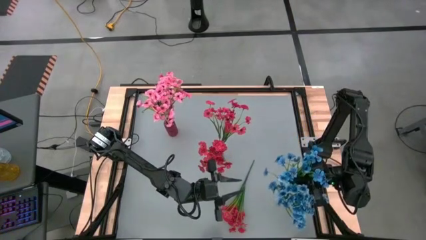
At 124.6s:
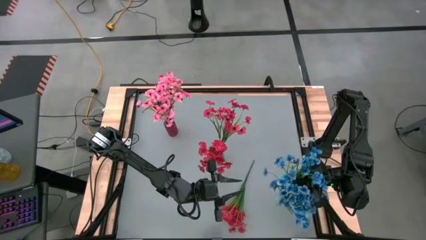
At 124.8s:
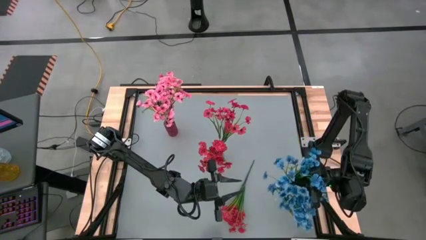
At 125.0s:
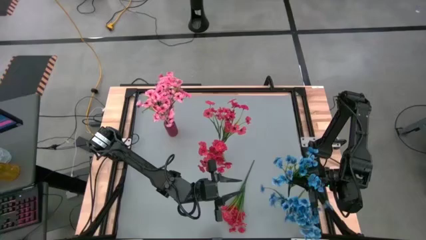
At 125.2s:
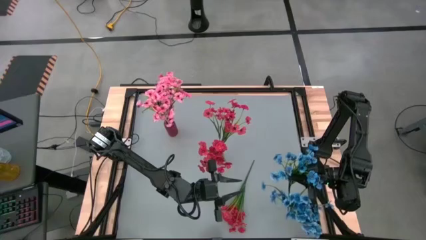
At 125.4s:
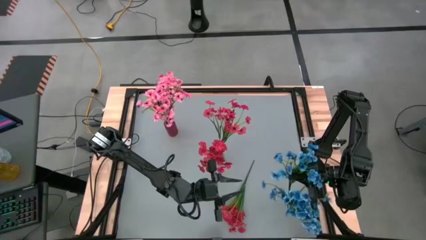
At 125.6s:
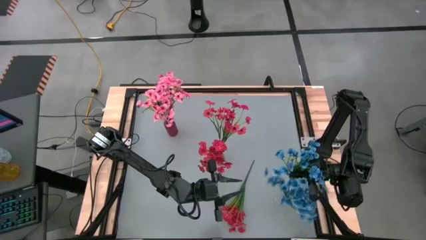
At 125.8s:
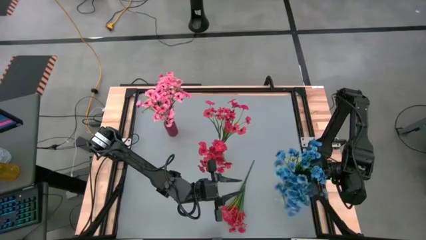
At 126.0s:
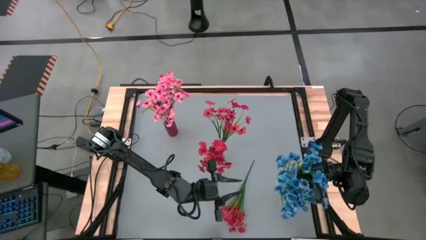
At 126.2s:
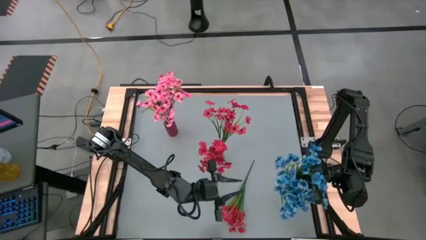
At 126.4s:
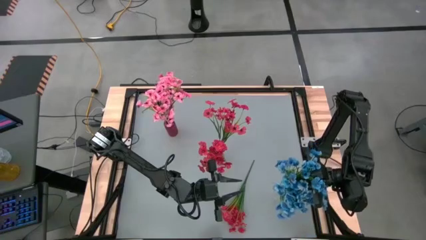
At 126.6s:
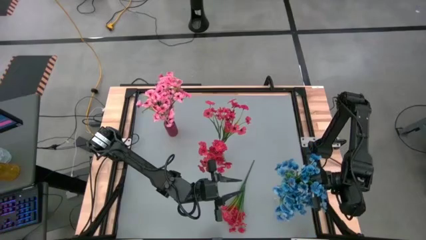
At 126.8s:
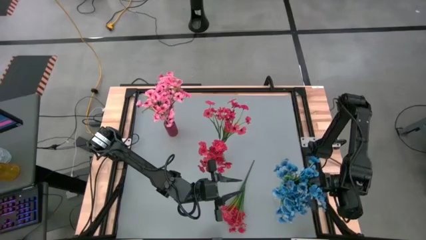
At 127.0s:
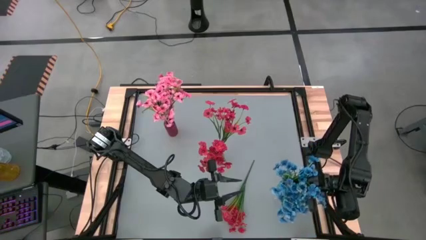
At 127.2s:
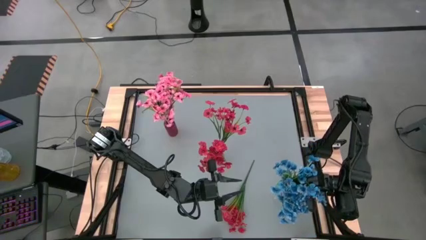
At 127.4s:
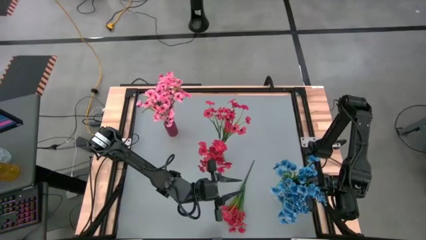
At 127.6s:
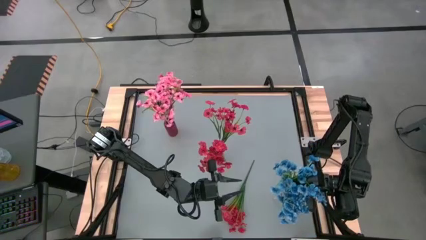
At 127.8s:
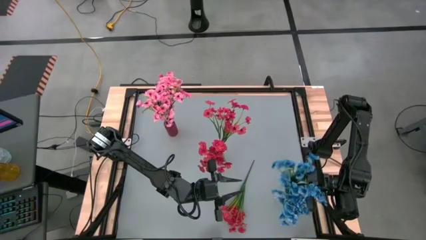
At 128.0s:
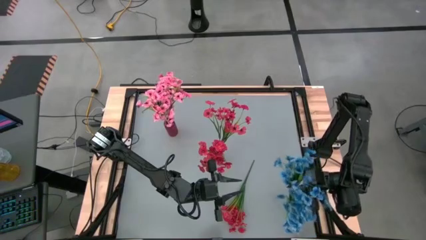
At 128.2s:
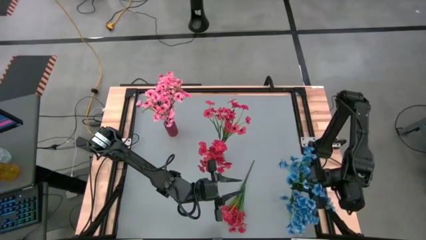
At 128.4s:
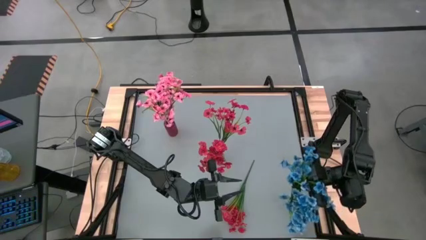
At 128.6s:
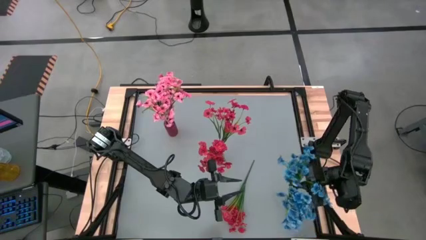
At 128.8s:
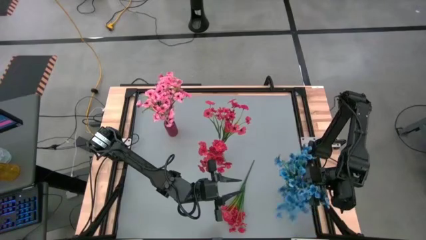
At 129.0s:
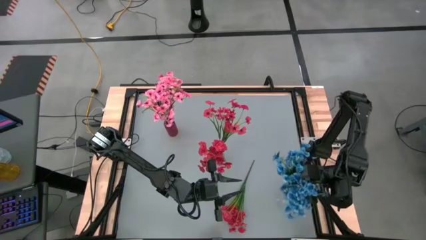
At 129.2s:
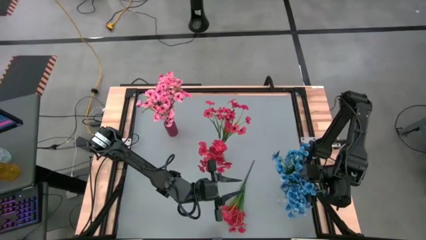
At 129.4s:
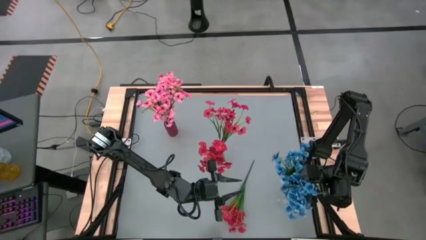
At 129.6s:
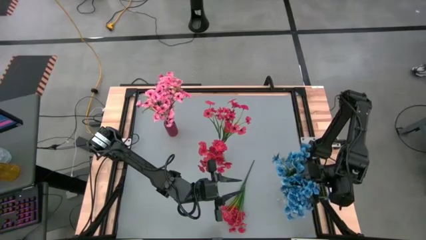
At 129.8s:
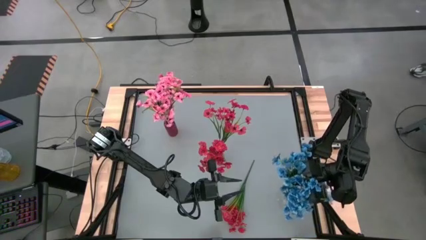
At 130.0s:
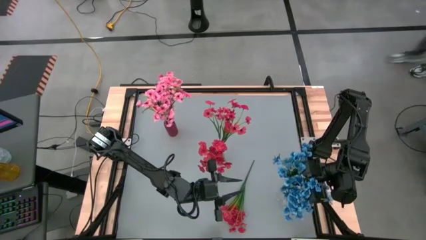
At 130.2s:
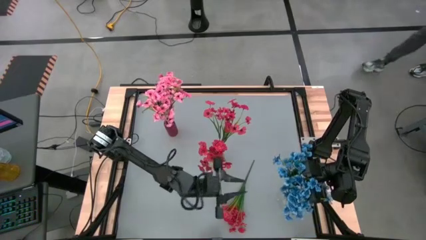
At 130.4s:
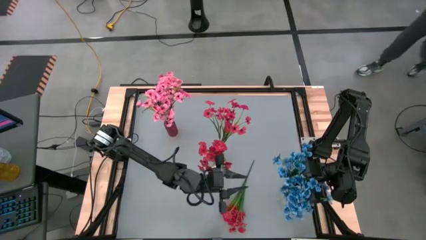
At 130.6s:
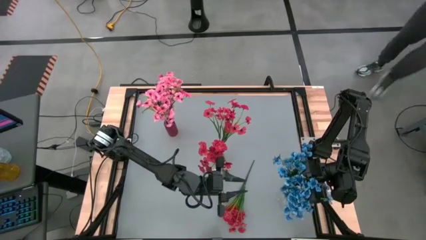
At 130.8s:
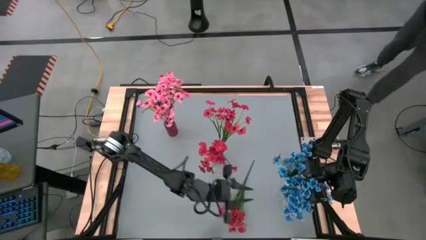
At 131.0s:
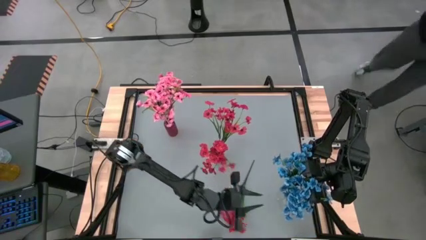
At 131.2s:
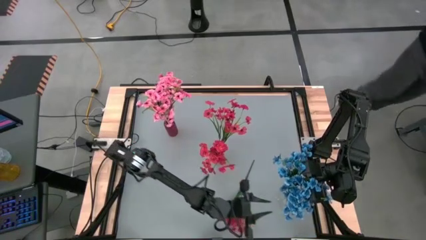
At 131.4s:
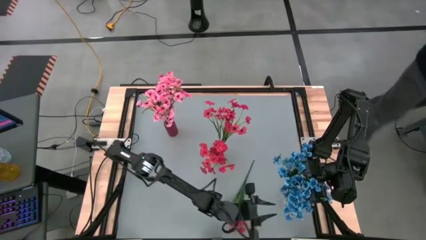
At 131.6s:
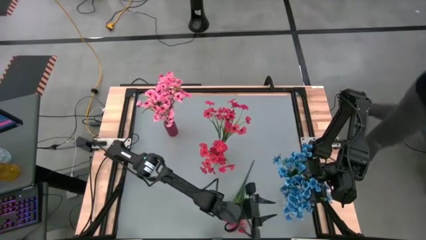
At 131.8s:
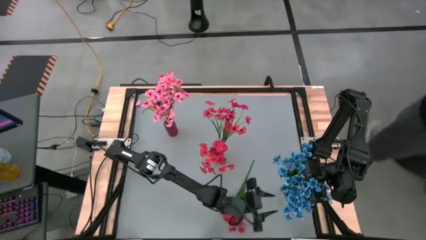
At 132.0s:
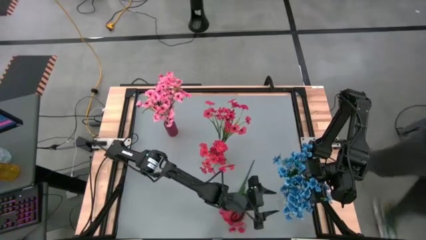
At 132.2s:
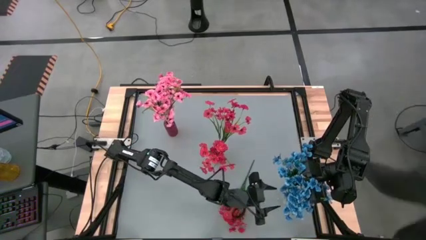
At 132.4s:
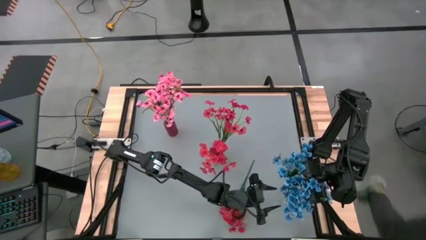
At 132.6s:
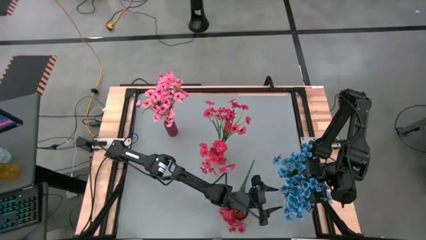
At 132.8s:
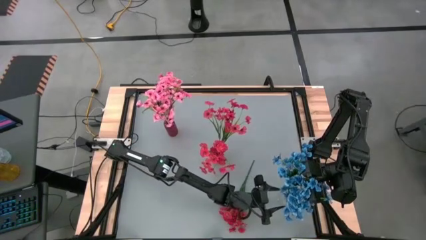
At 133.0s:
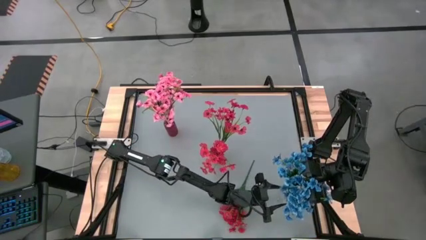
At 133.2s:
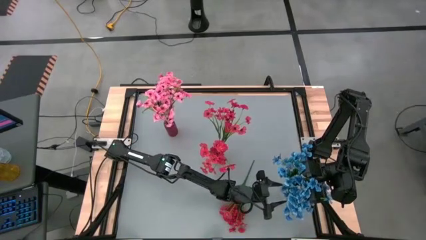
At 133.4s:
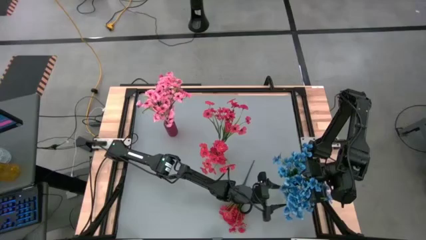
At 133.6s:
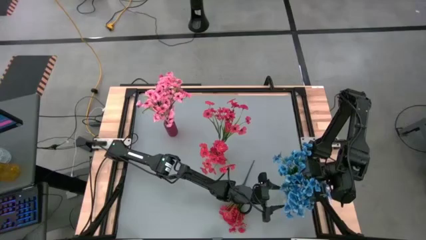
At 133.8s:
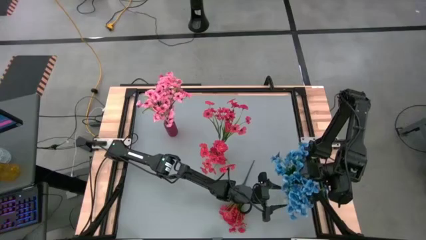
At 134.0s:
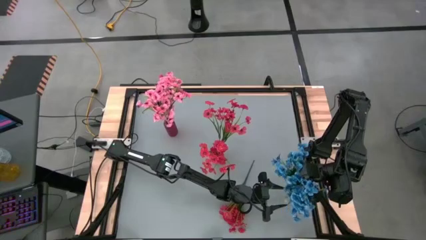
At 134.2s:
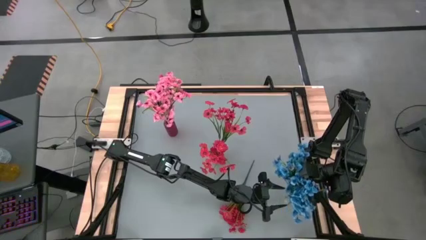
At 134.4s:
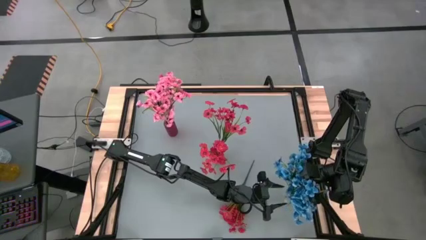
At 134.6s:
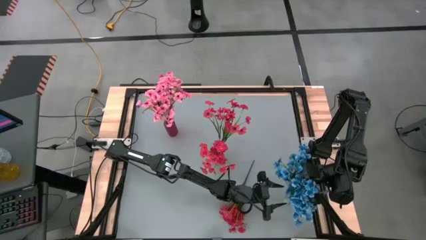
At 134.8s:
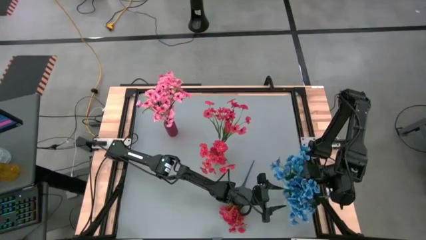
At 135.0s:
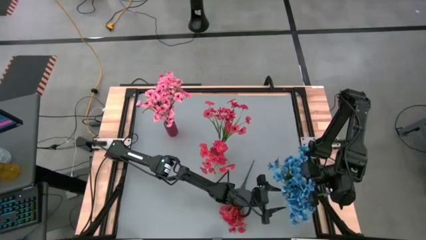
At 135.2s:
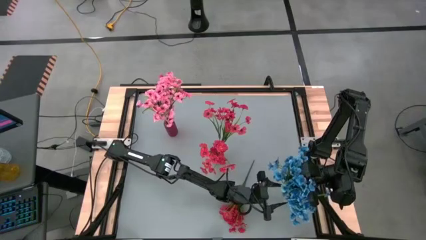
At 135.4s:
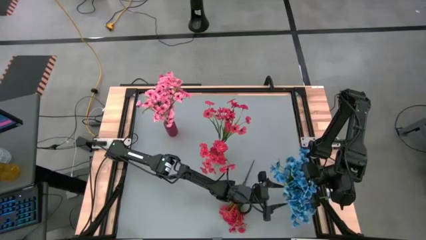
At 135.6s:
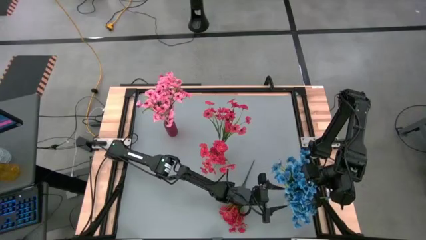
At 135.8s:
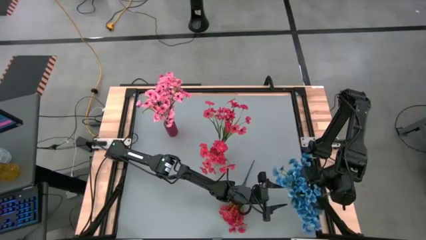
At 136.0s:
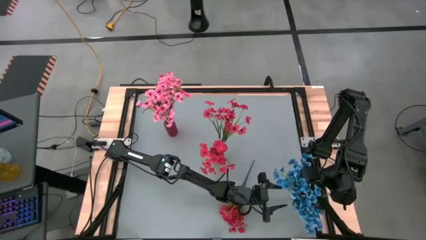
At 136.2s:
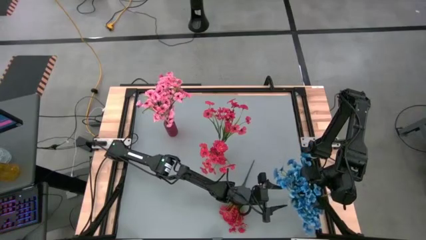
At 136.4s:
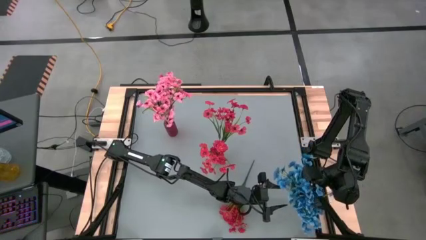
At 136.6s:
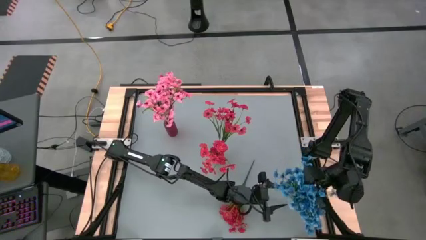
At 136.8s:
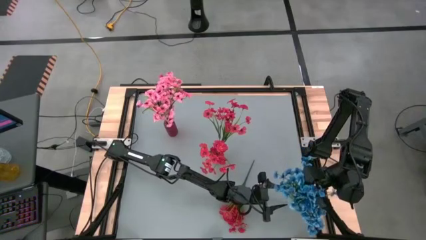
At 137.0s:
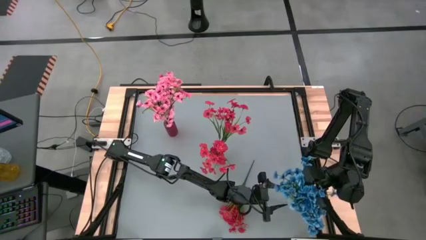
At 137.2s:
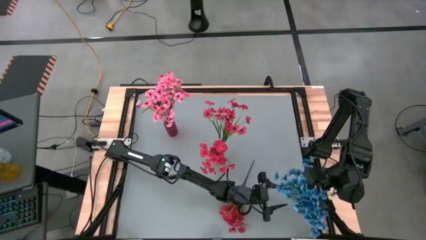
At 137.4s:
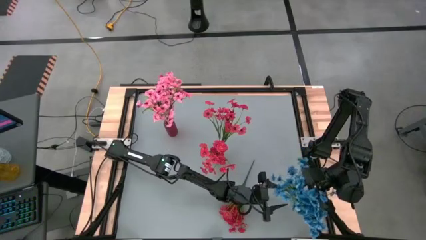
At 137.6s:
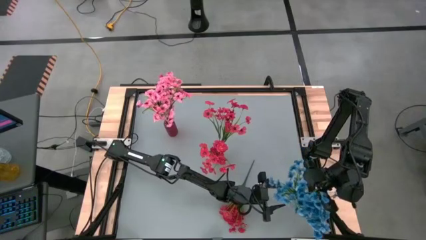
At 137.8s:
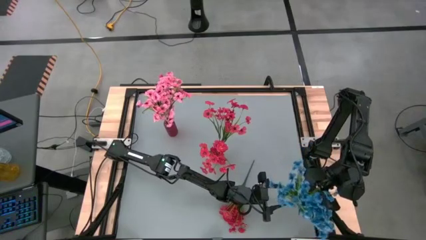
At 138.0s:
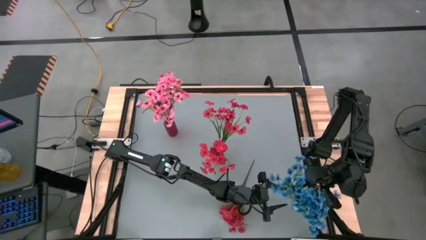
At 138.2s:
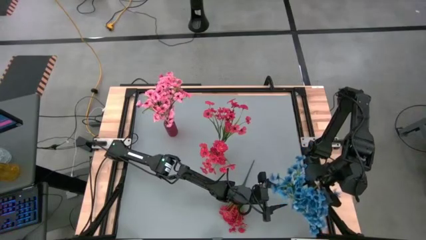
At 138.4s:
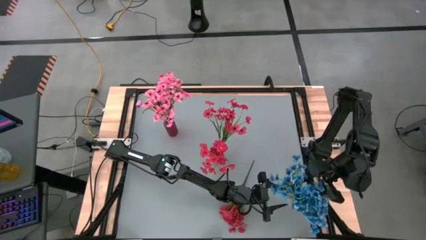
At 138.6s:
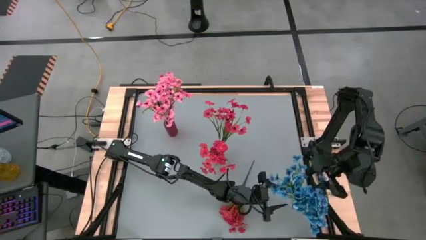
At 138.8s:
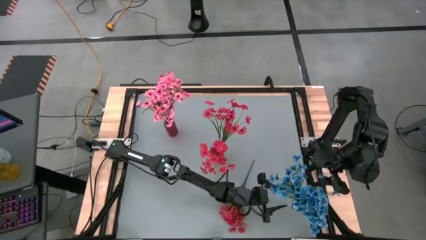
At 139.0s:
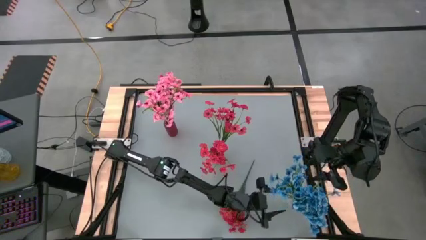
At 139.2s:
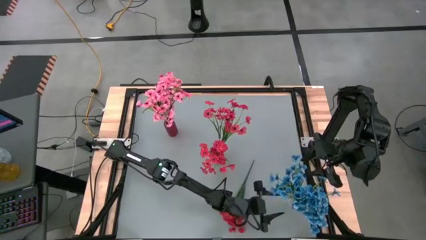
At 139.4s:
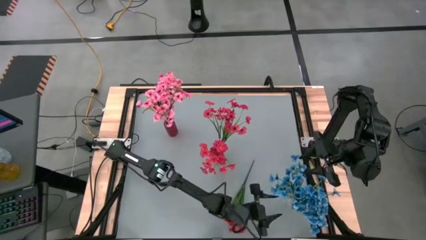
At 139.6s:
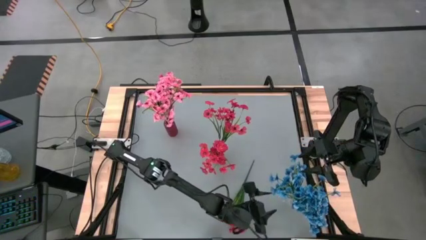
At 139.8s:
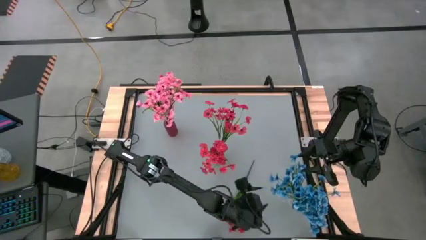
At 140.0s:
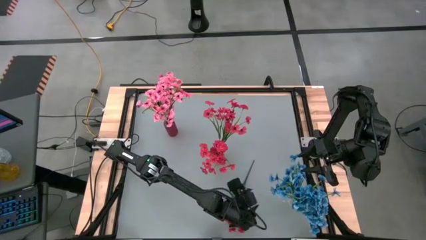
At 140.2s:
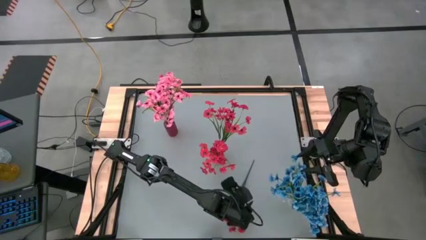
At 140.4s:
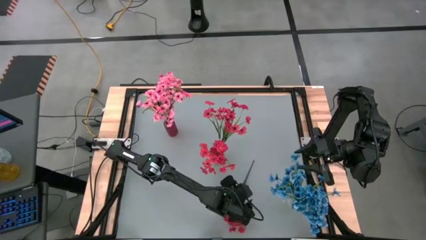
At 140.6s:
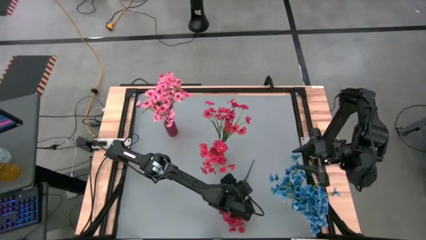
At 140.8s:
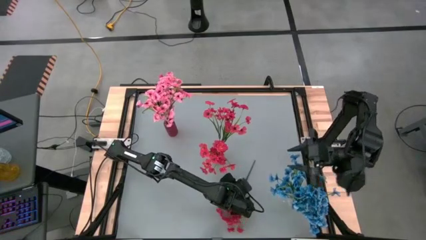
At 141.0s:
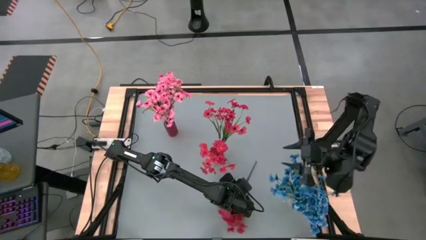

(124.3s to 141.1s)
Task: Sort flowers into vase by color
Put the blue flowers into the transparent vase
